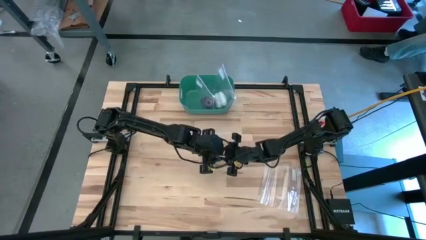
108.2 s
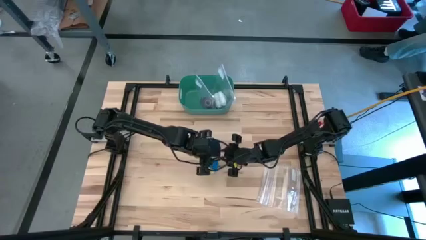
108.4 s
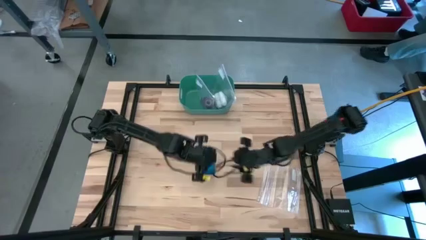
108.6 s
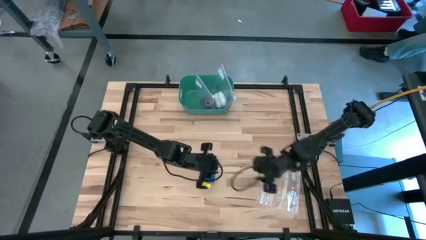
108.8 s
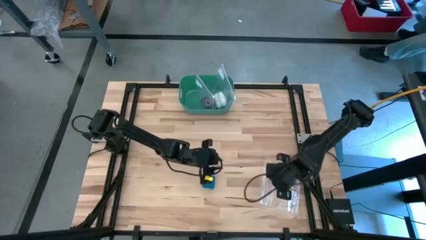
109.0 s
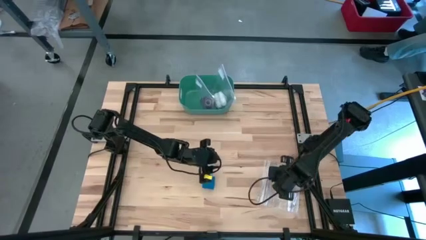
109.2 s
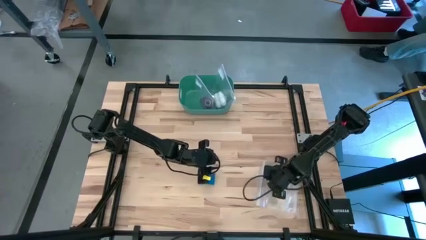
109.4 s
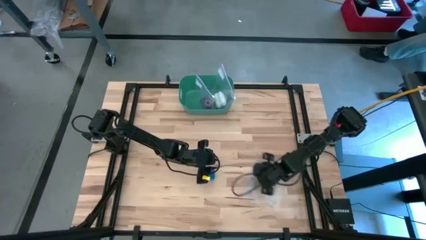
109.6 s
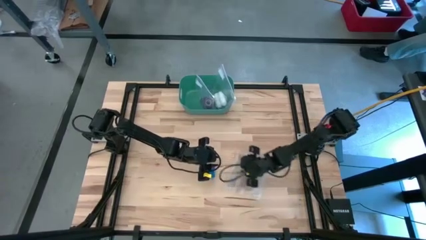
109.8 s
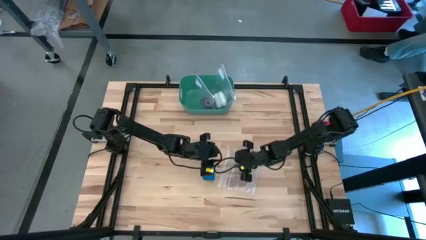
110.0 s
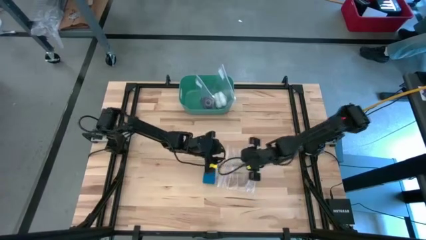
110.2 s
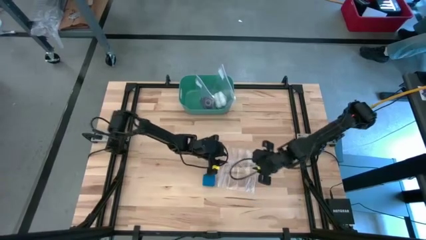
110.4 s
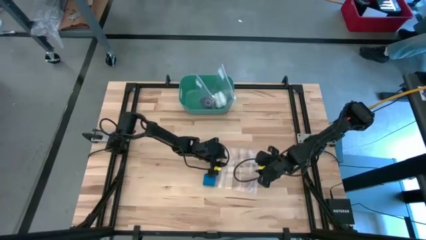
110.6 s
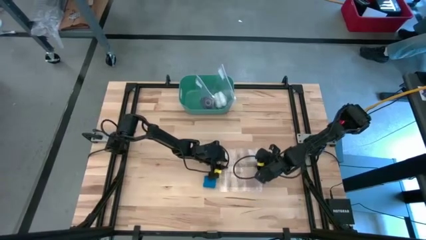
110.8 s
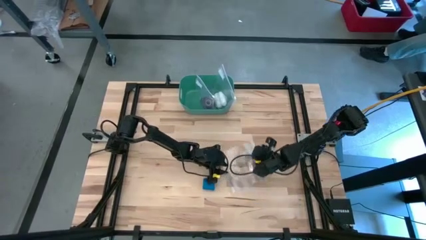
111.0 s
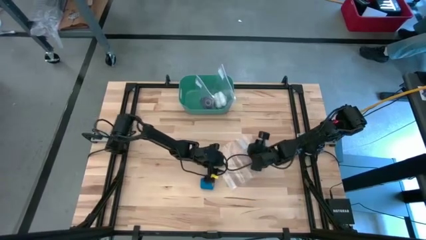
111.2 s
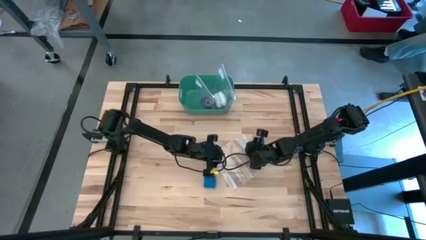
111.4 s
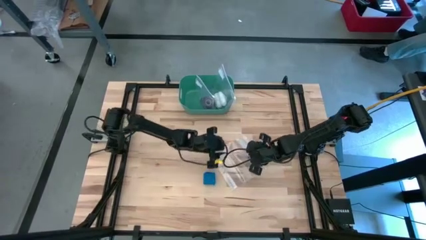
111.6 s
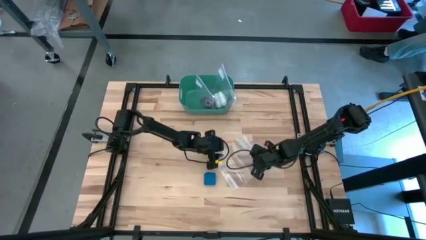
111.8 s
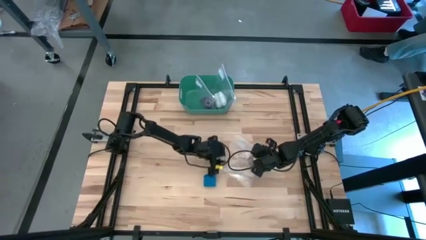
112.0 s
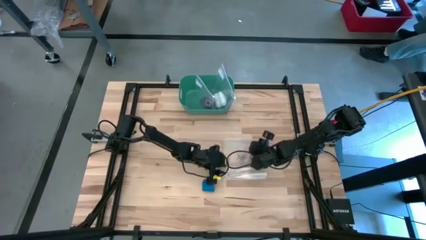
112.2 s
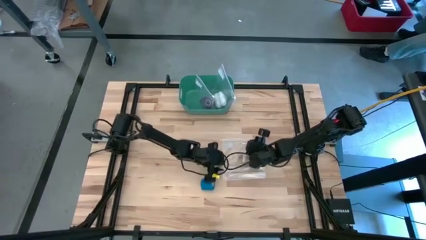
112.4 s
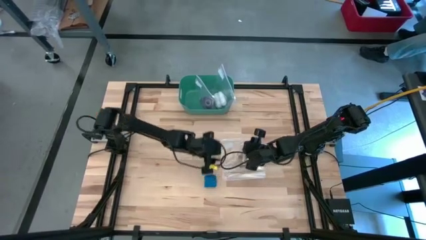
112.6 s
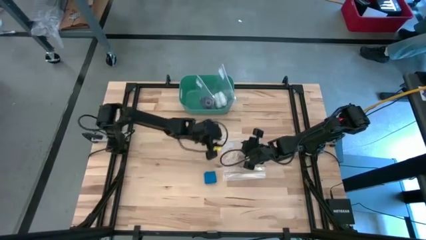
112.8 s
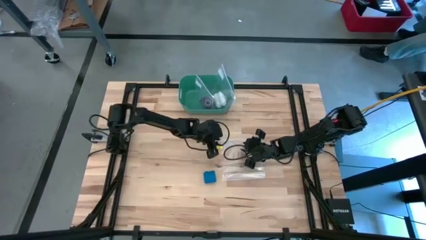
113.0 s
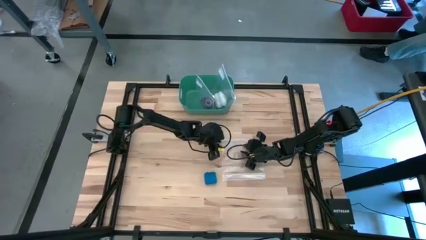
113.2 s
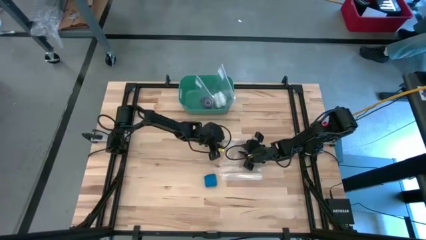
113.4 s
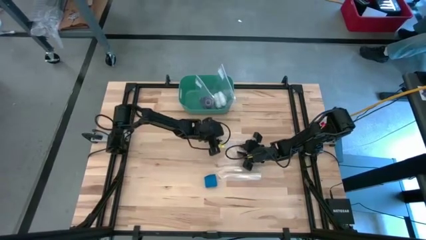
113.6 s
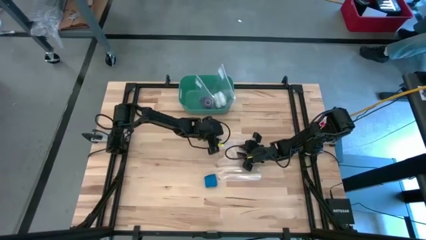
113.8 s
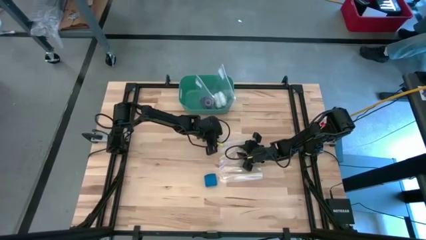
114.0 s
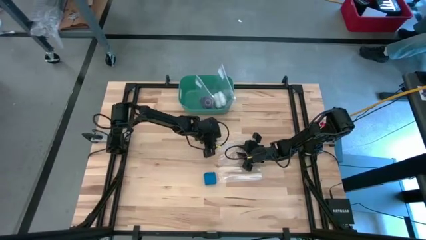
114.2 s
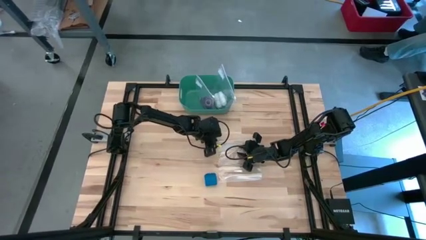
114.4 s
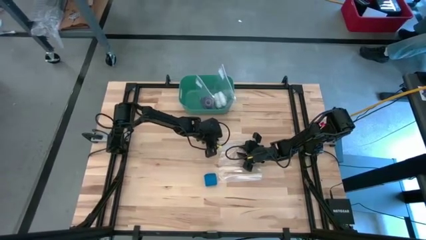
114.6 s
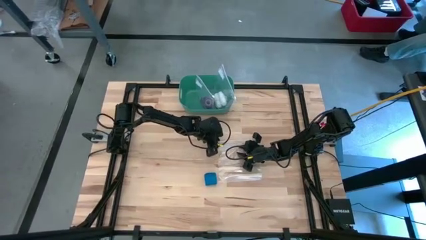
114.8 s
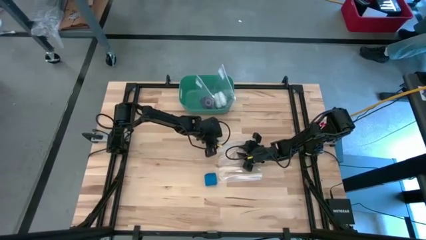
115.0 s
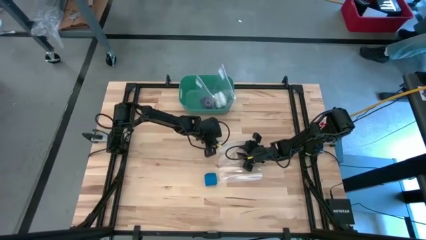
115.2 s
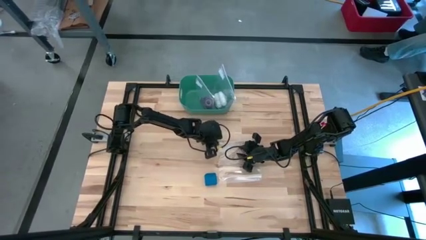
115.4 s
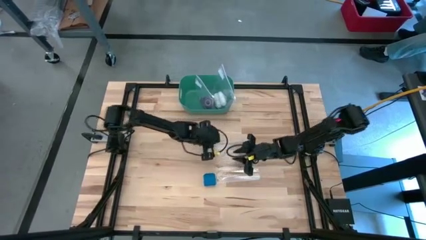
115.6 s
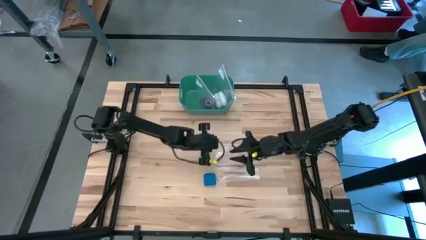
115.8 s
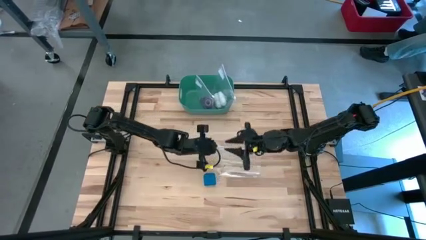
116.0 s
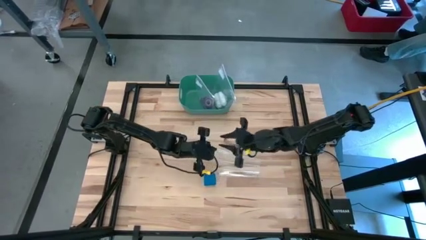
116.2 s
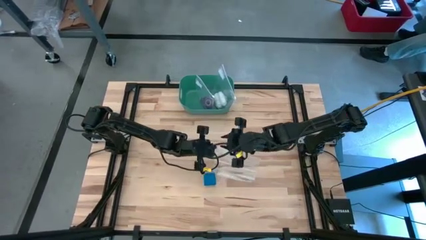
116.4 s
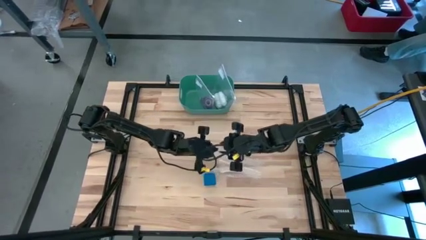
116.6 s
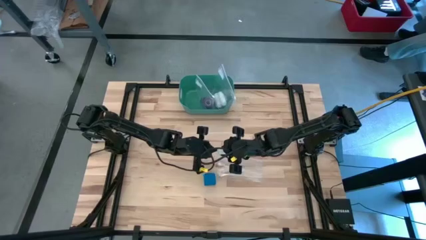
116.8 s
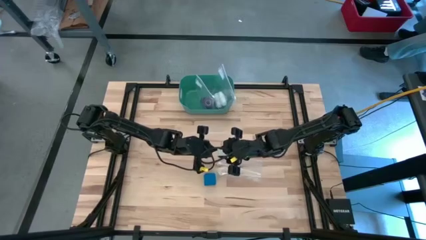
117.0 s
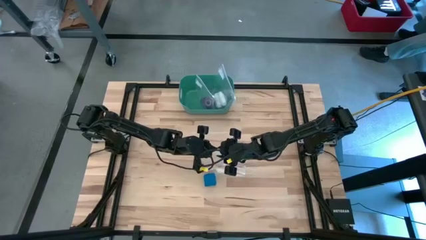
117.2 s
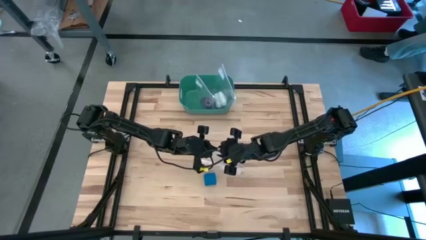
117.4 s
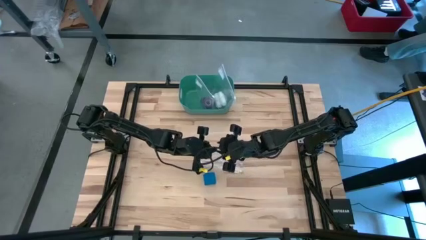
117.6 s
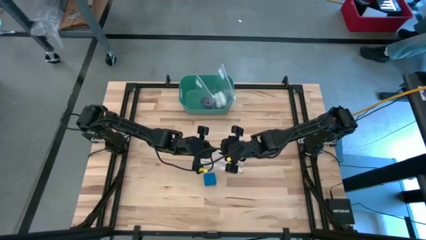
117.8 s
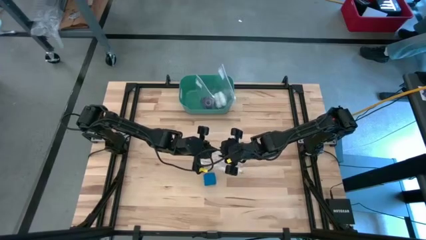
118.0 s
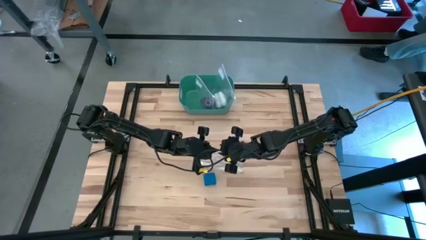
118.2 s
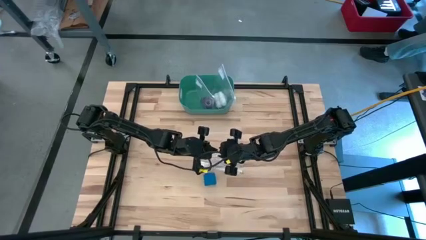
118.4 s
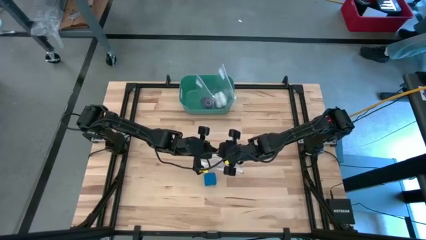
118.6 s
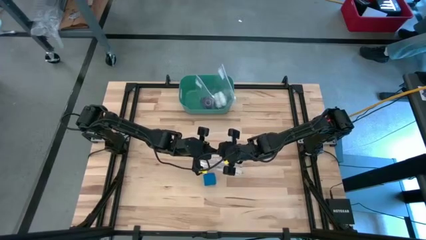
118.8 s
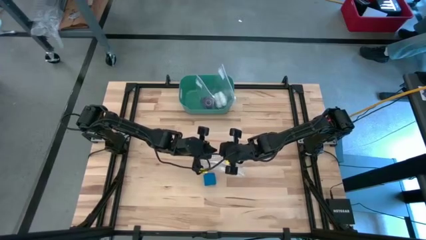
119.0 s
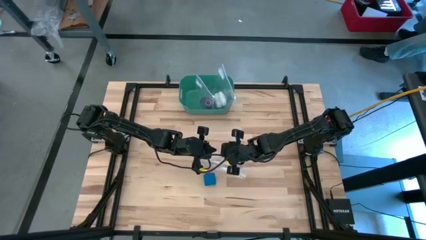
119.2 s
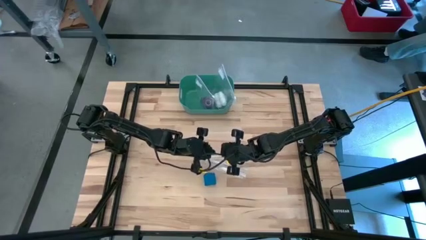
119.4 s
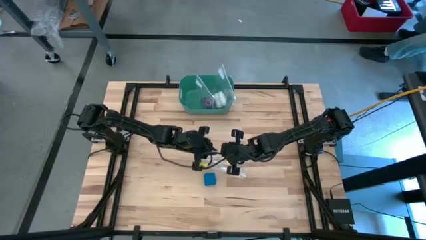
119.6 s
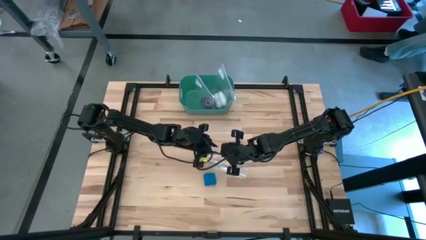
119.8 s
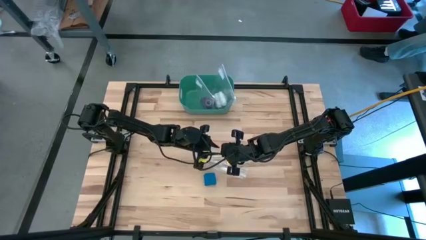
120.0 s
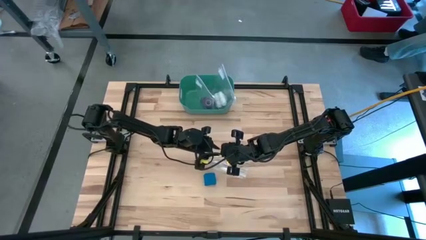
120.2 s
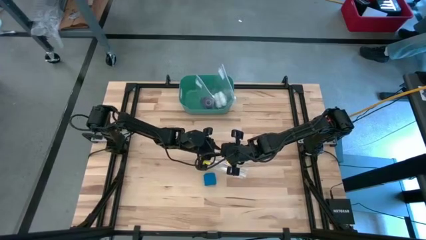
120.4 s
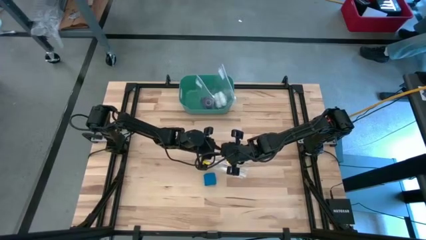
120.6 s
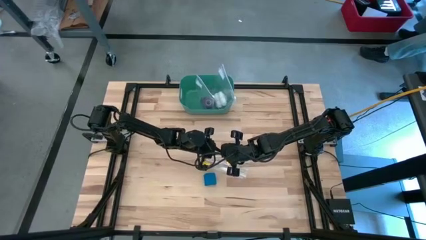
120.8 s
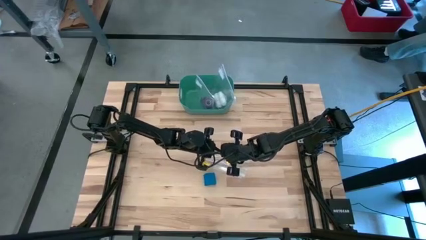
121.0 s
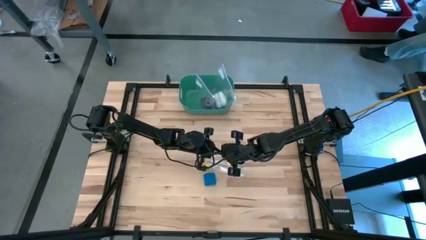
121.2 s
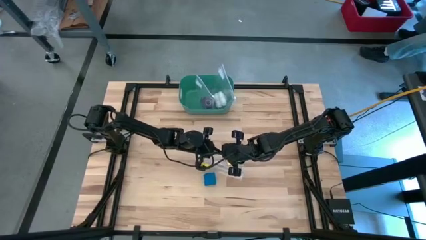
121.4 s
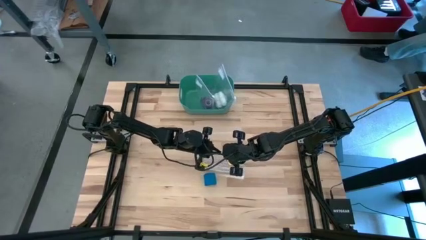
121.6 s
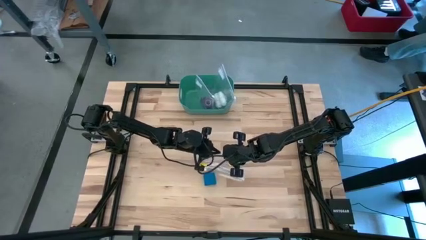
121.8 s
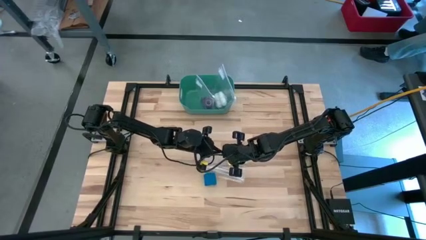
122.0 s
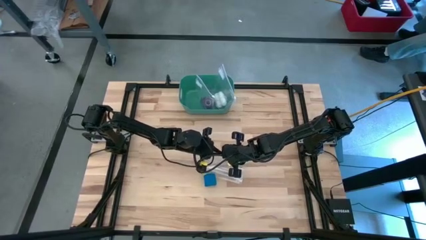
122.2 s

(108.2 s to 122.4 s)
Task: Roll bandage
Open the transparent zip bag
